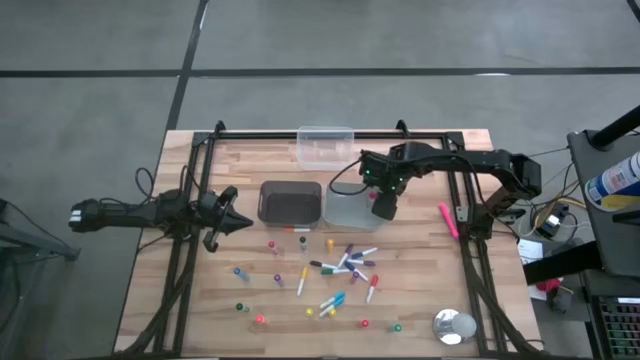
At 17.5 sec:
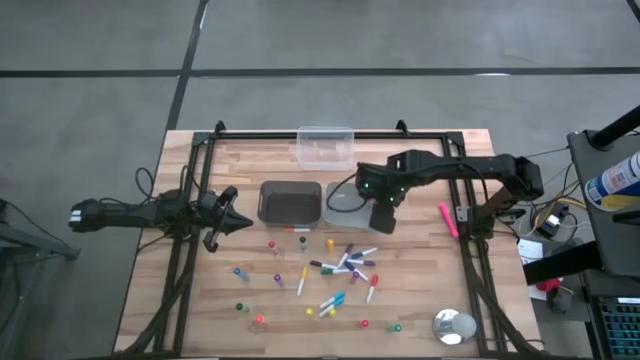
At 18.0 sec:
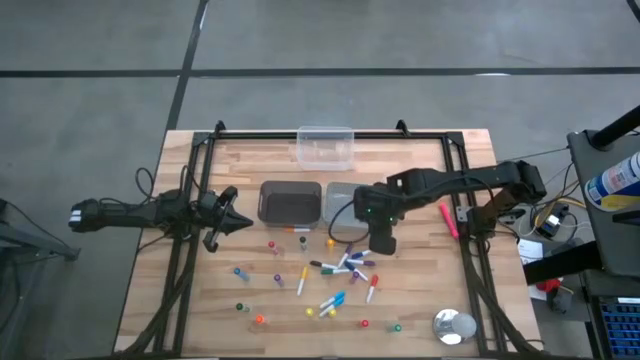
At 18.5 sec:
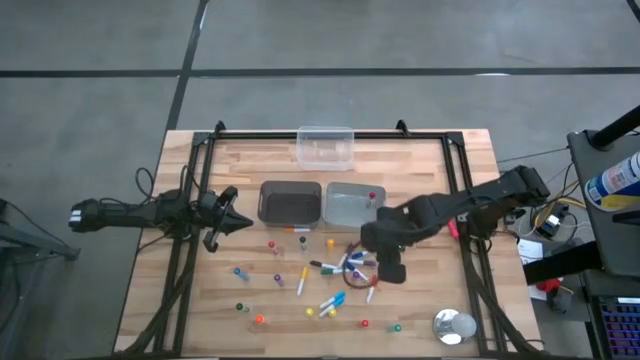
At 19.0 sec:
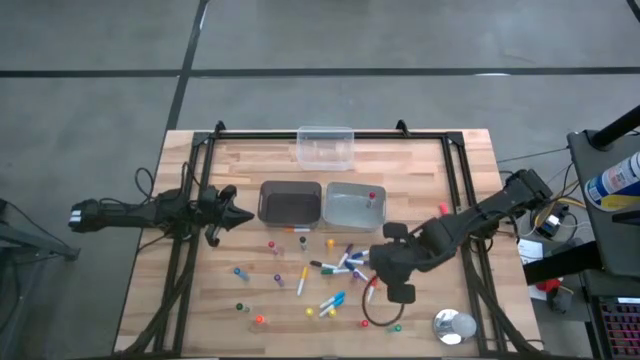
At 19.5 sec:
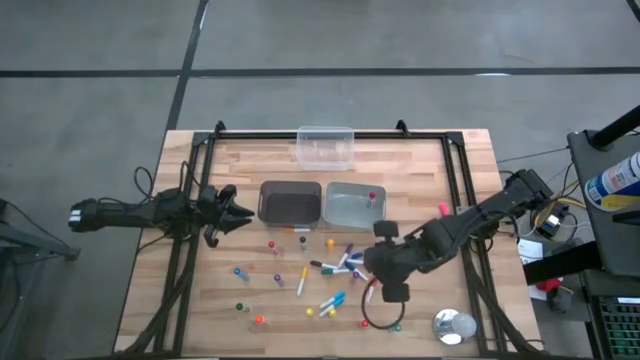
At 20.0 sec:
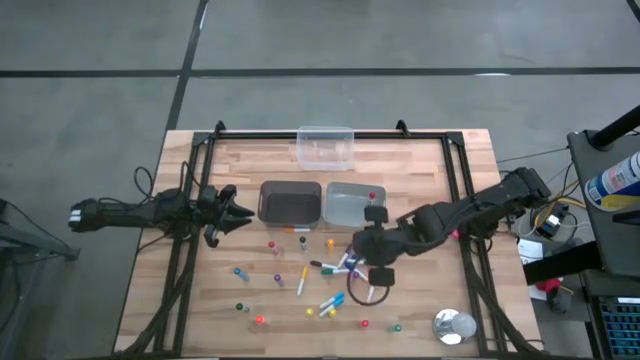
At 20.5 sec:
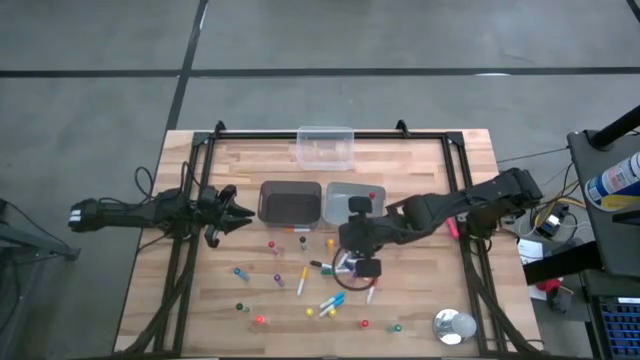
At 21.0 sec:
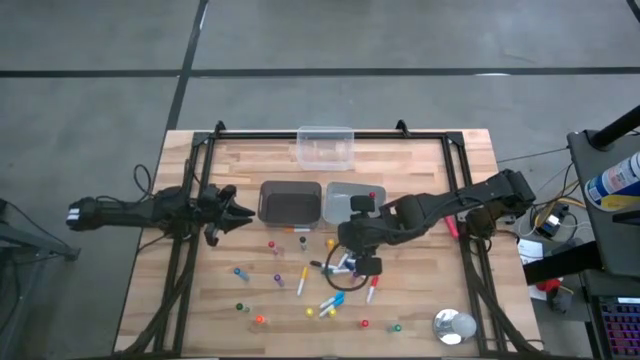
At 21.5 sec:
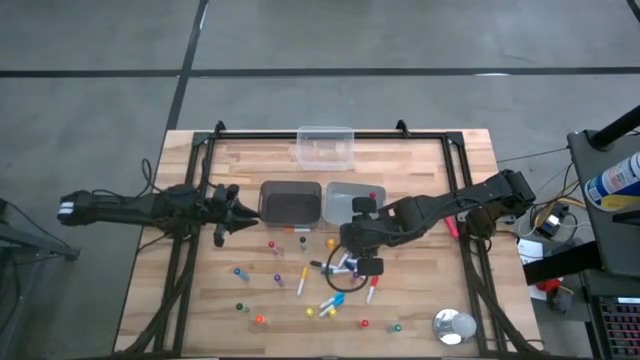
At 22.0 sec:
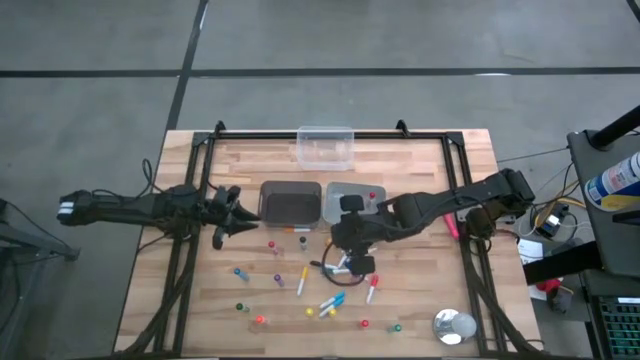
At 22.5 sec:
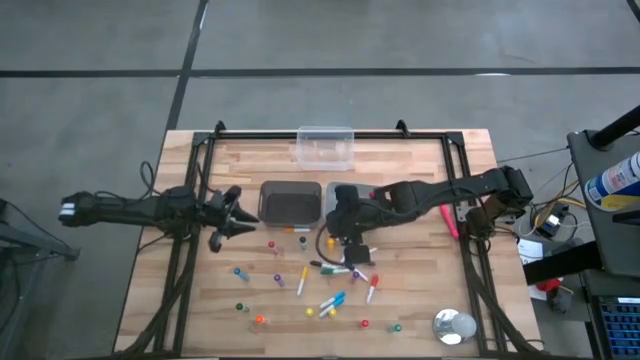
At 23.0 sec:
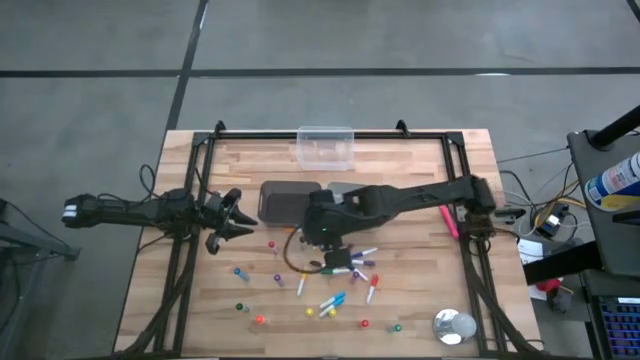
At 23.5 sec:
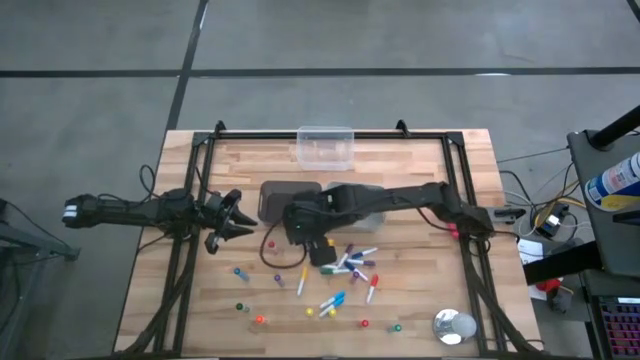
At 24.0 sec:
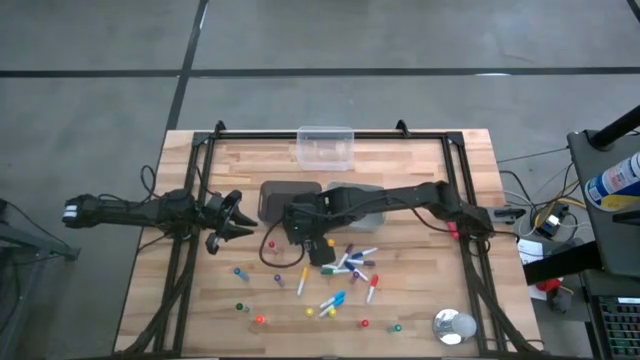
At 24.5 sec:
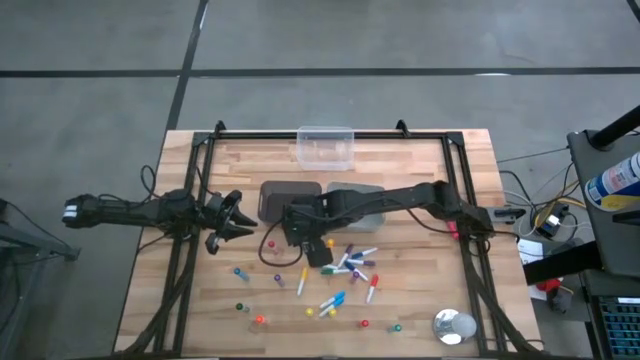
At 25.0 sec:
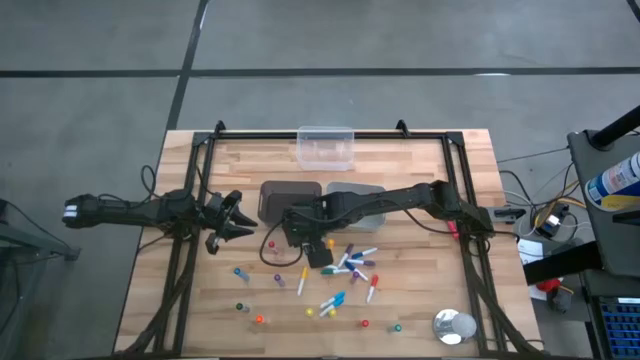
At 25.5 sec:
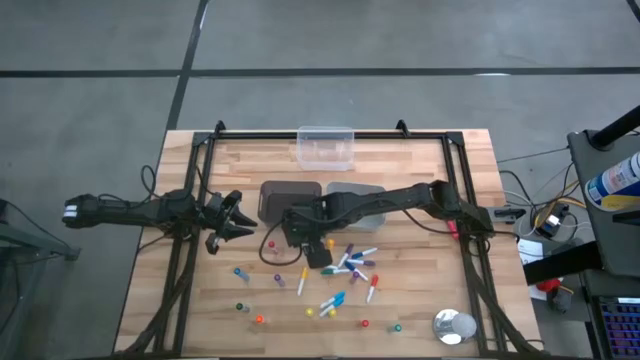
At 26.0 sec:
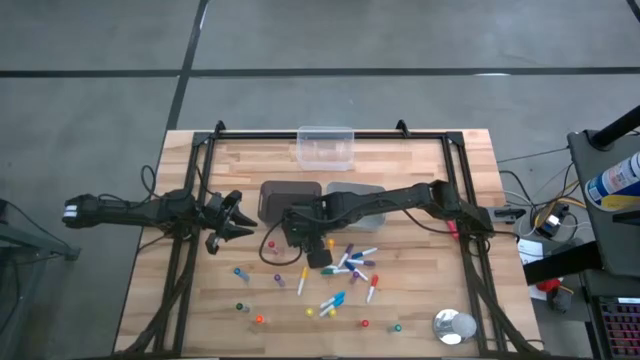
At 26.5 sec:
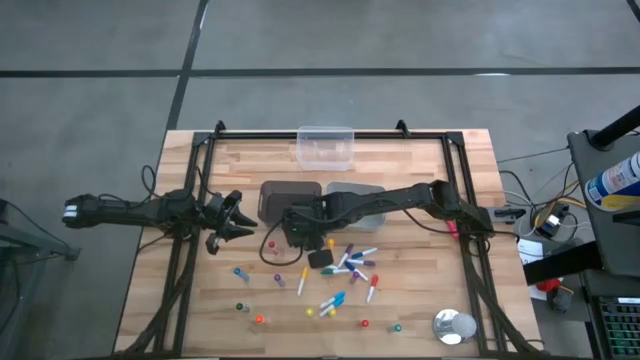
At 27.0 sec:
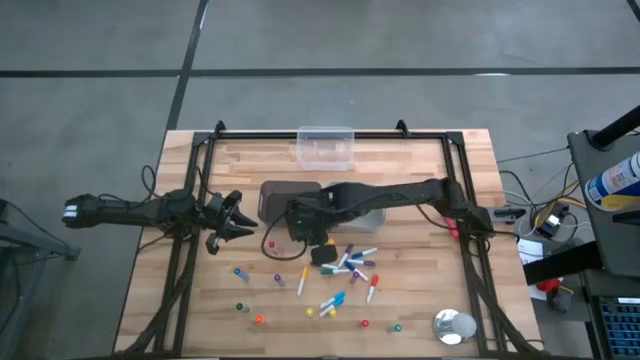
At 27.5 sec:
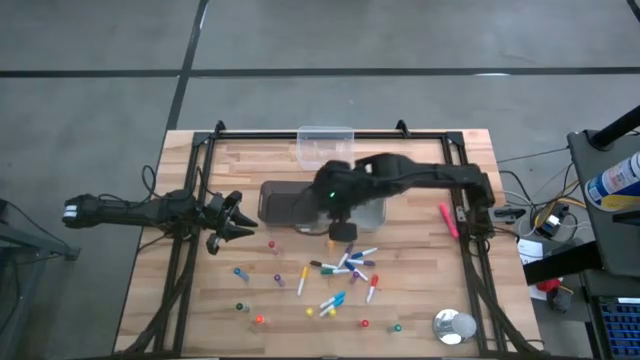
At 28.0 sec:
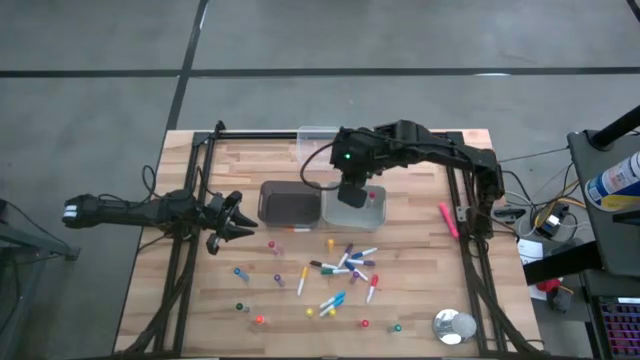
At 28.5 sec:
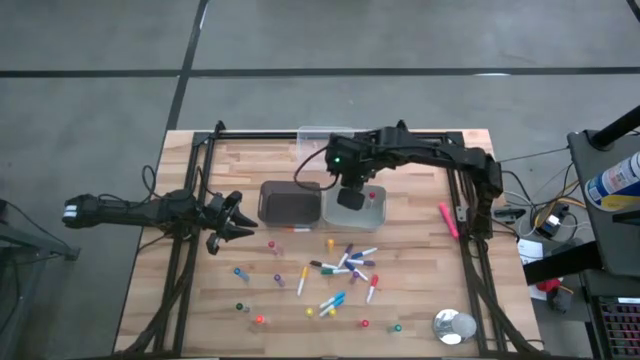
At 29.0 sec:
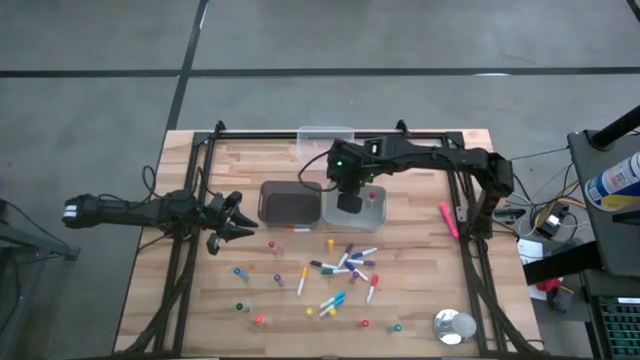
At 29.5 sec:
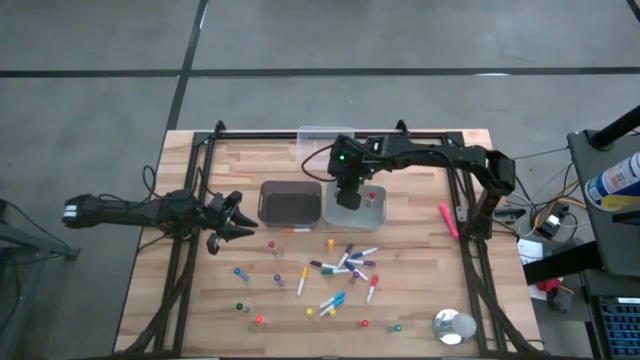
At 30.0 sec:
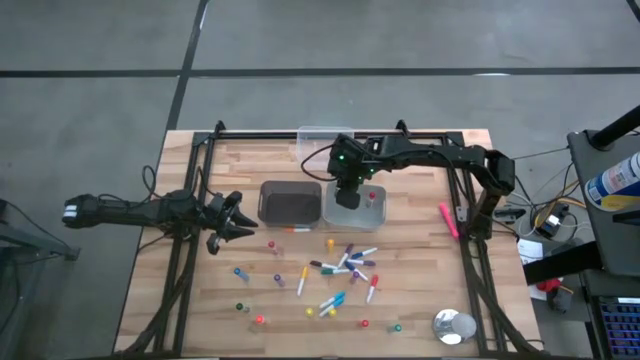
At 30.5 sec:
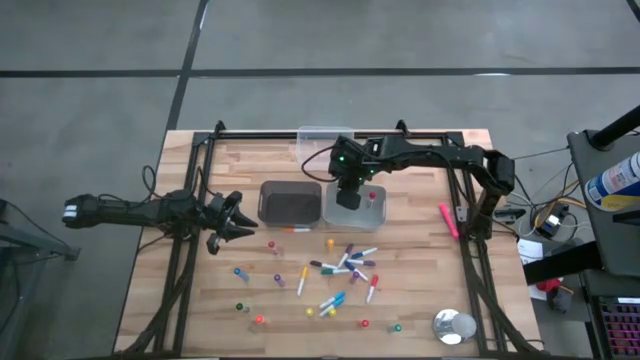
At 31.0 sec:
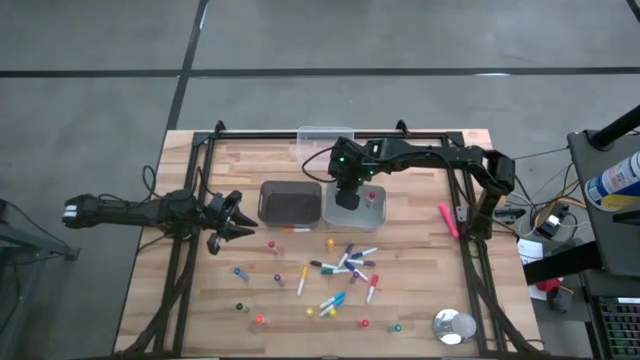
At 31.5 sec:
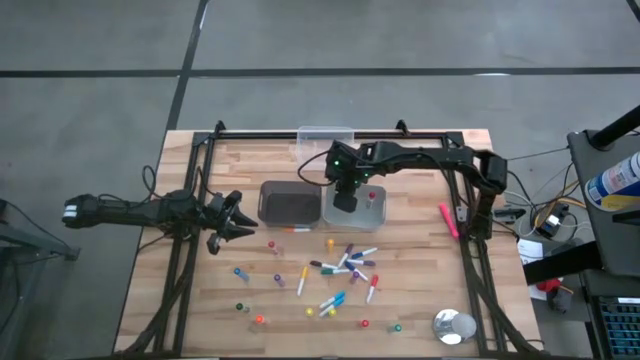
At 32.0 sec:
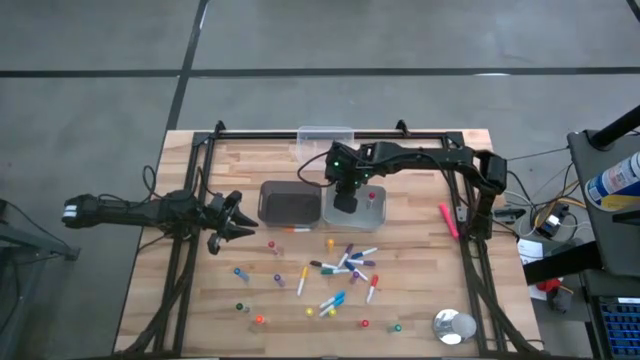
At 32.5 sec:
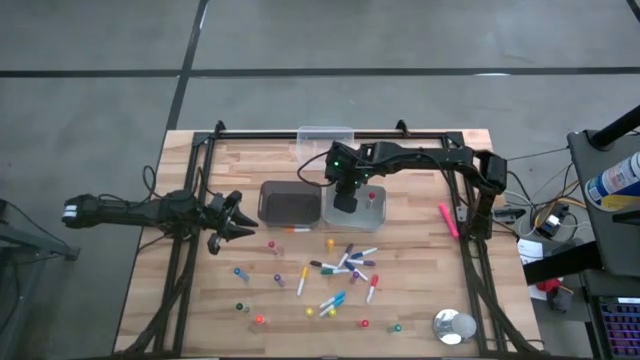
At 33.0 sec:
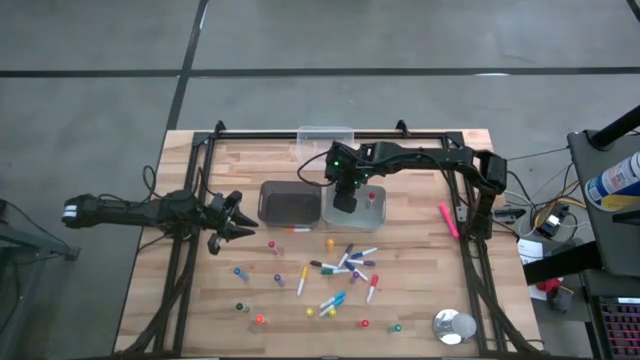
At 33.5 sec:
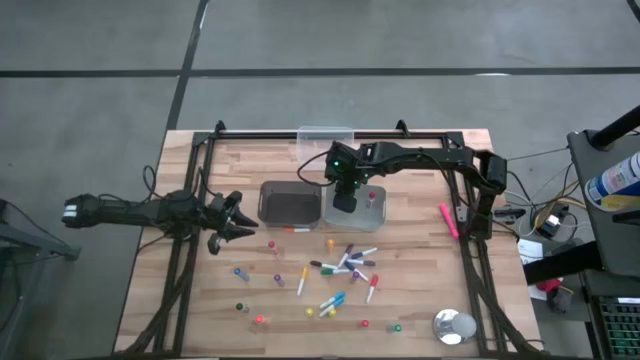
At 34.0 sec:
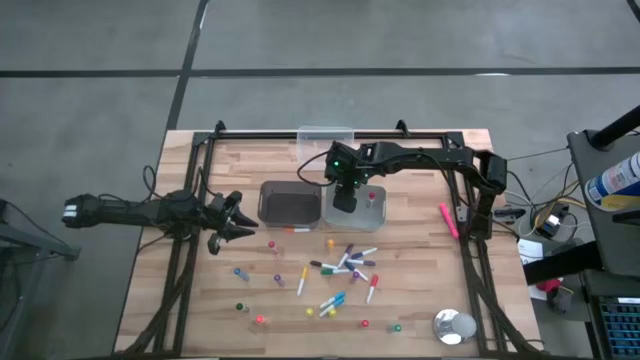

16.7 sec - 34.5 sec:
Task: Pick & Place Markers
Put the large dark green marker pen into the white bin
